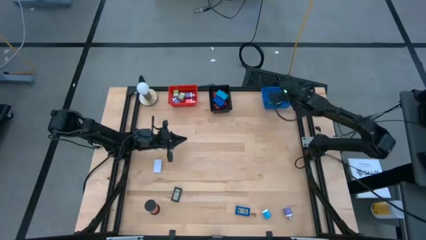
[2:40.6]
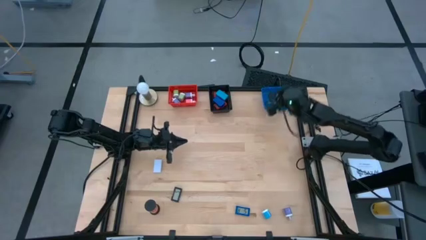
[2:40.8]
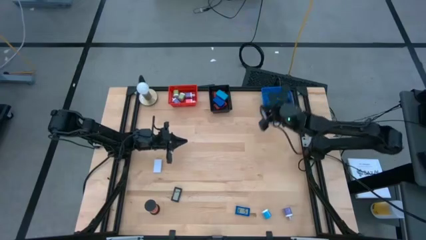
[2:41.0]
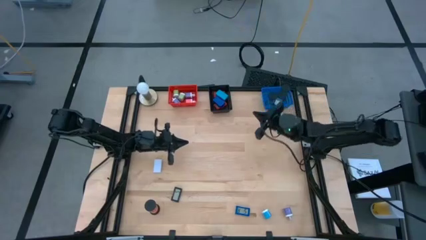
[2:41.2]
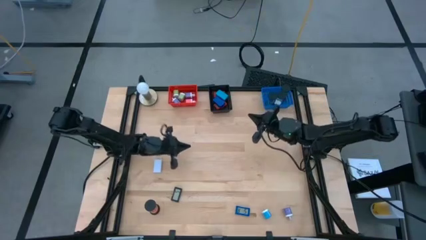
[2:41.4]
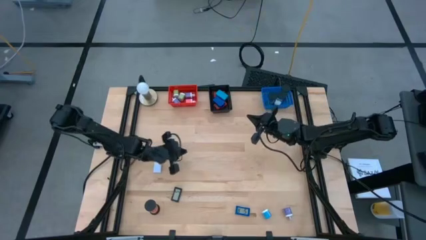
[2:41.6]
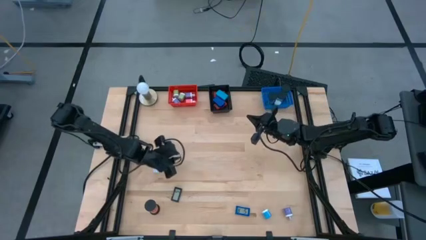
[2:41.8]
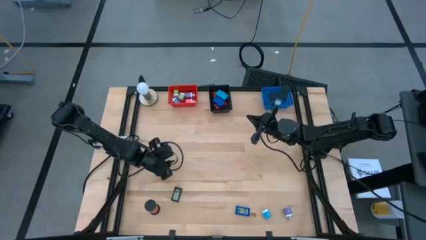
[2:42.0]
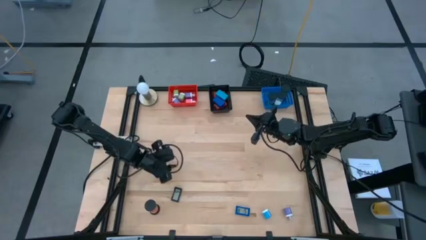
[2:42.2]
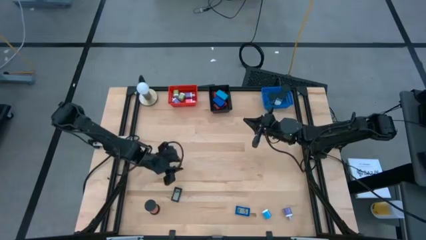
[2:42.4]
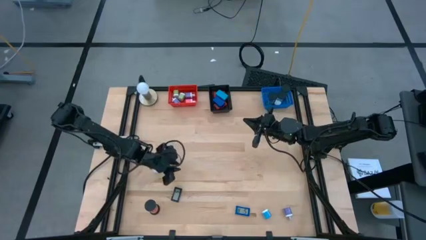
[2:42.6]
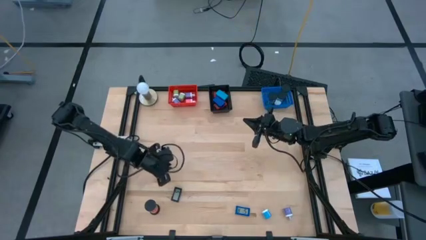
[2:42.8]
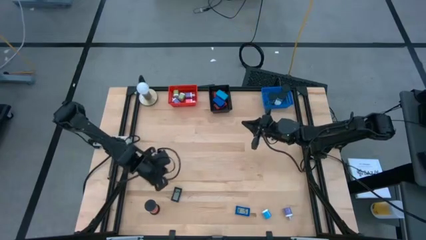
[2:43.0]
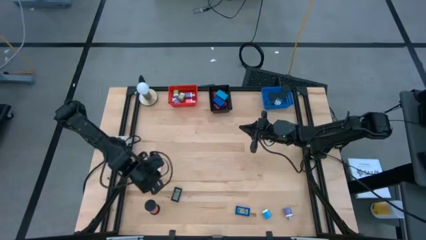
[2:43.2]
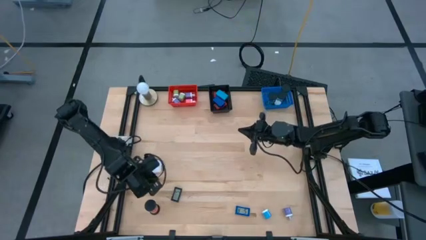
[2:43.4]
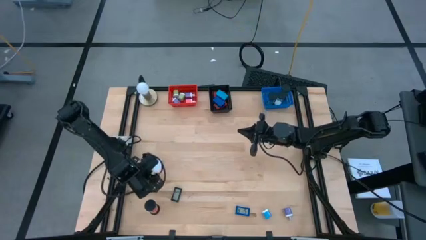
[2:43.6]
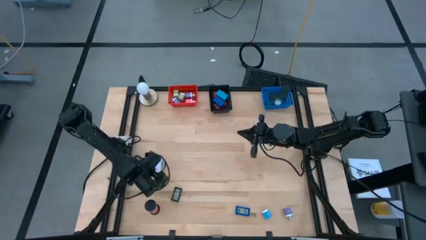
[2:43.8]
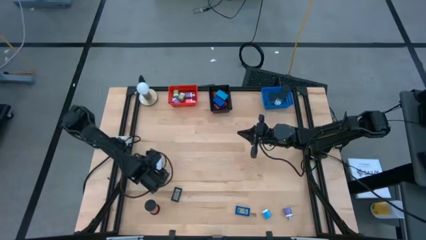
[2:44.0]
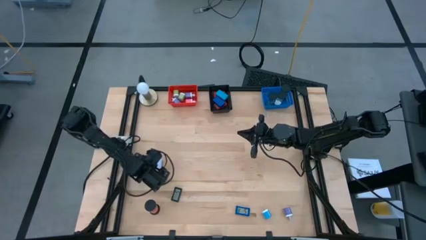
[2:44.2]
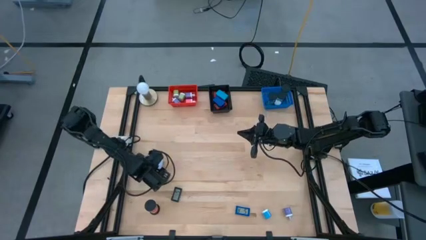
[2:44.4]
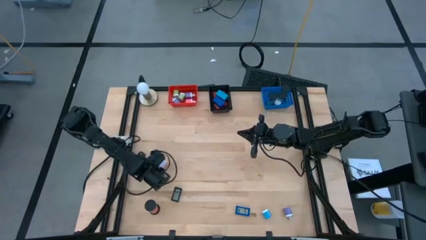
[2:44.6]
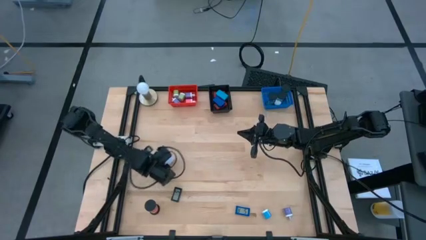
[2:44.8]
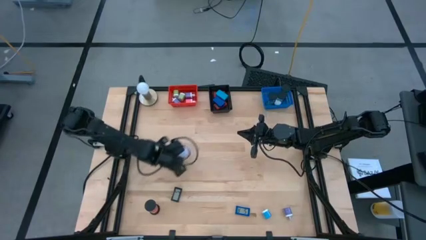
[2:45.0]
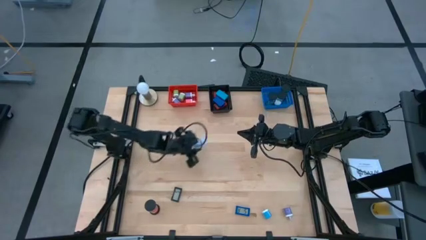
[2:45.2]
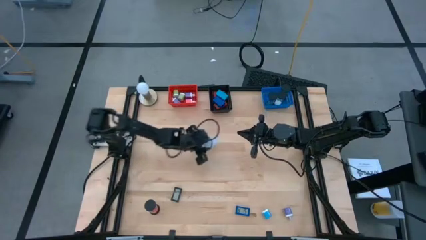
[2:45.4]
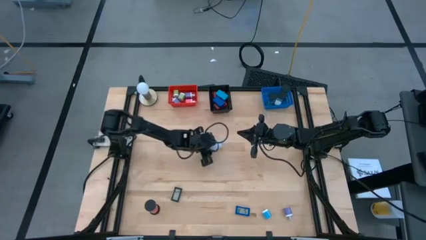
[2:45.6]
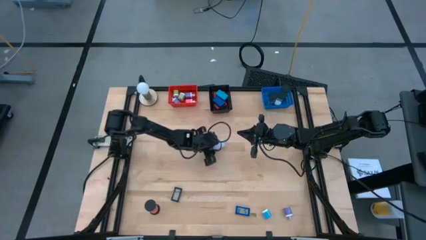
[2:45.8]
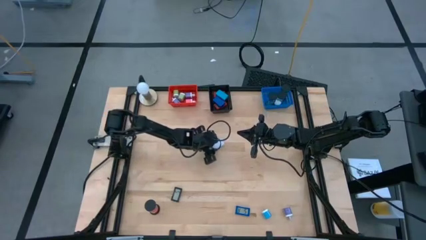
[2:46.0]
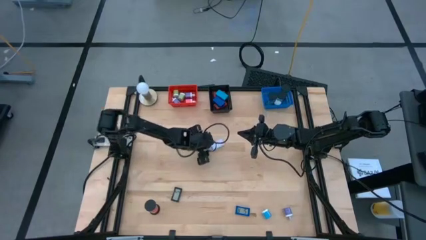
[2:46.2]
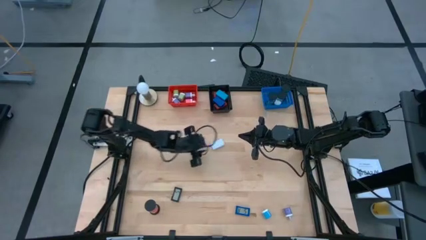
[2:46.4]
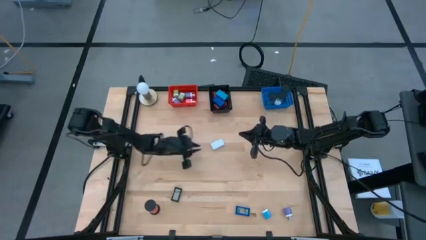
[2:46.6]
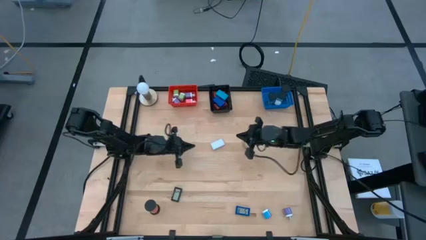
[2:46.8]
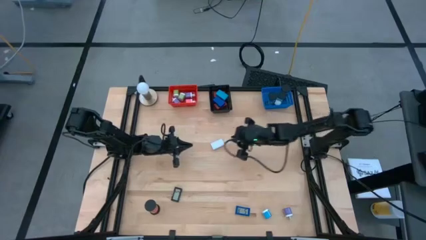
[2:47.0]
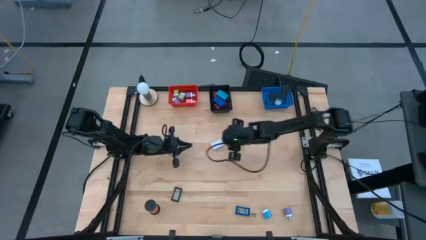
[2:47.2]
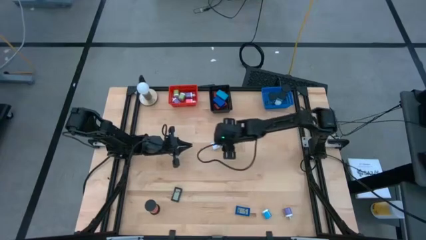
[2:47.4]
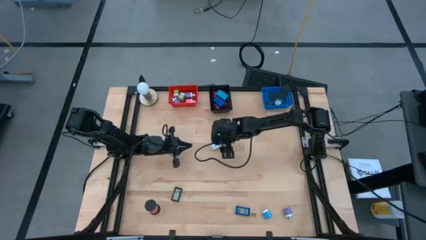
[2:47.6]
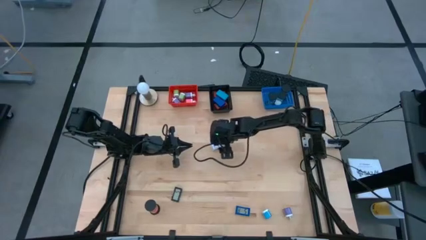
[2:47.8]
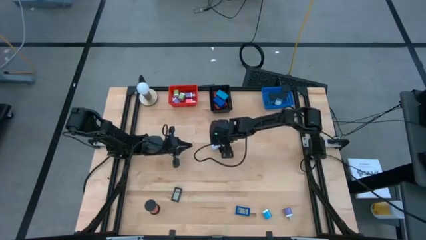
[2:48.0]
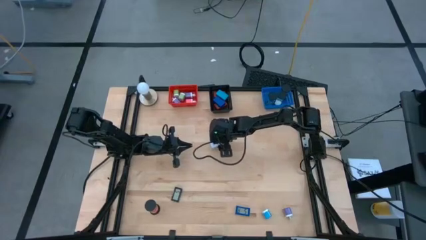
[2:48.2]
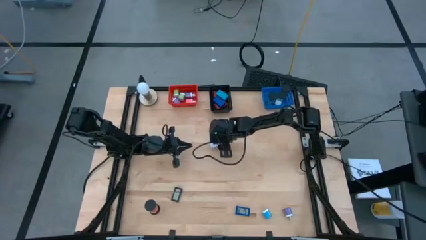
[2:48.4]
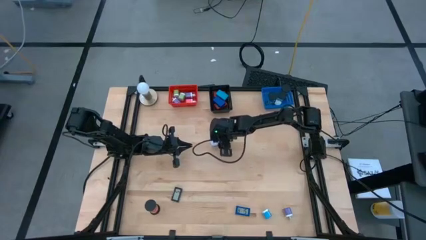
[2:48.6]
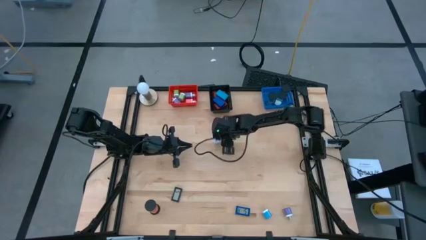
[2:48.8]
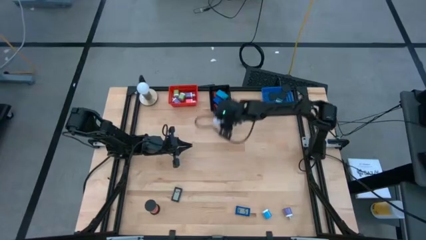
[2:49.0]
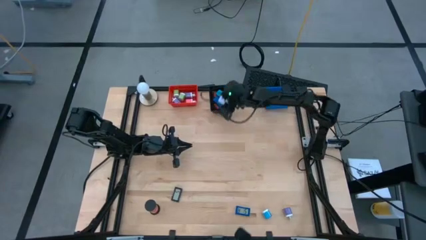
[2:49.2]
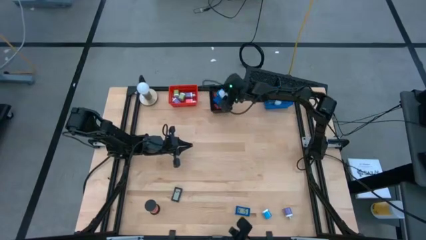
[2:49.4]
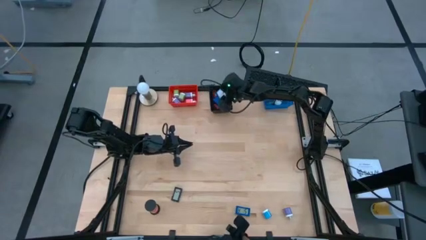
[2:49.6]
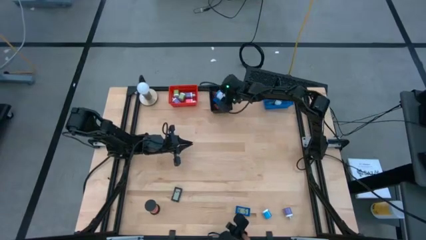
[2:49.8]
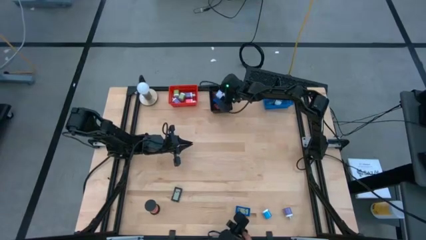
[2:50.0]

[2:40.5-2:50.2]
Task: Pick & Place Office items
Put the white digital timer into the black bin

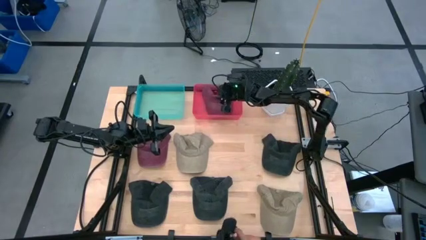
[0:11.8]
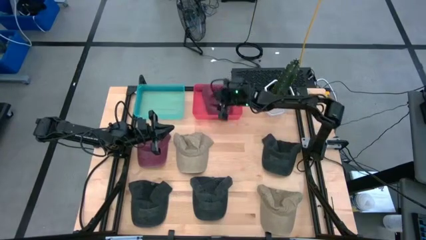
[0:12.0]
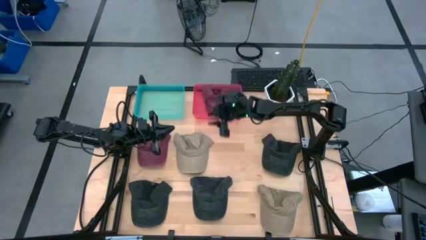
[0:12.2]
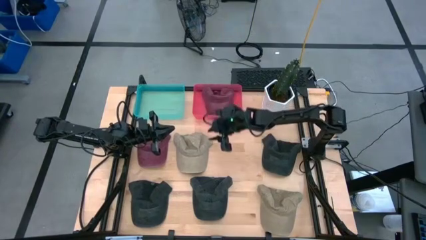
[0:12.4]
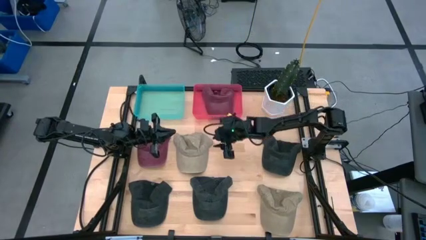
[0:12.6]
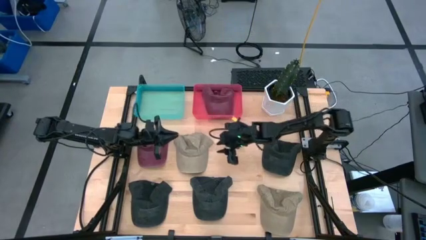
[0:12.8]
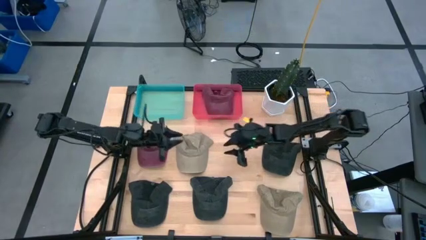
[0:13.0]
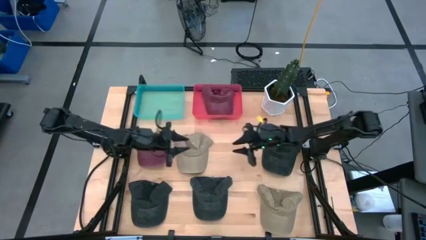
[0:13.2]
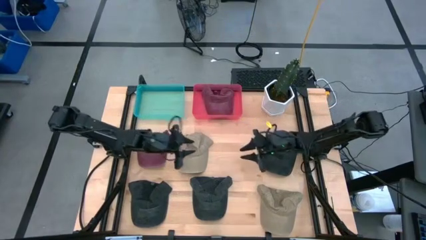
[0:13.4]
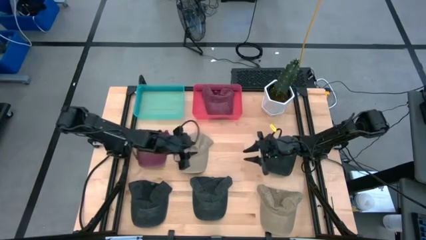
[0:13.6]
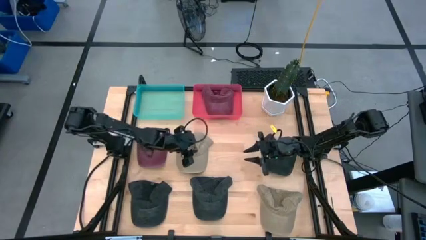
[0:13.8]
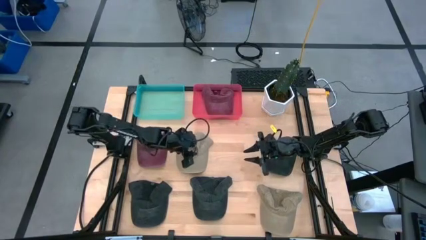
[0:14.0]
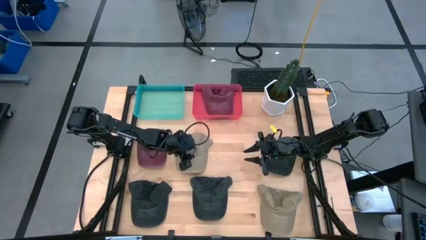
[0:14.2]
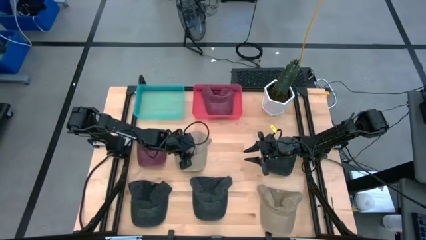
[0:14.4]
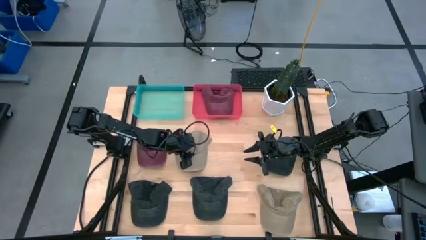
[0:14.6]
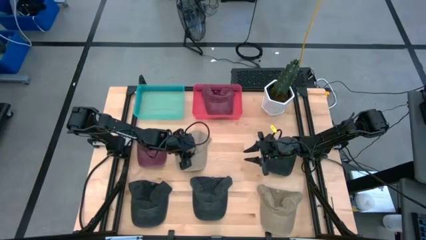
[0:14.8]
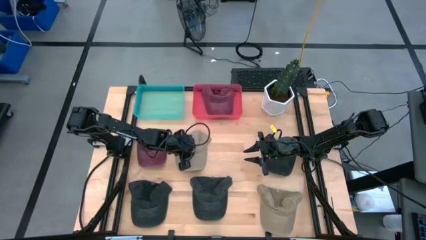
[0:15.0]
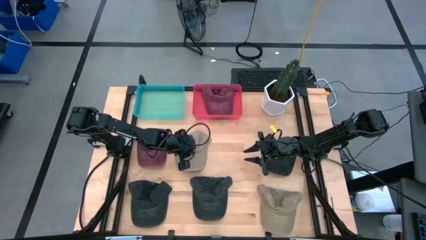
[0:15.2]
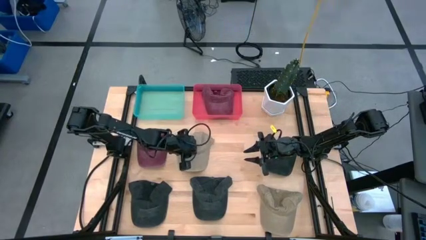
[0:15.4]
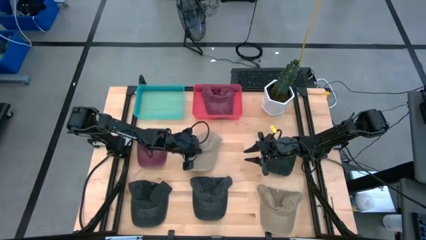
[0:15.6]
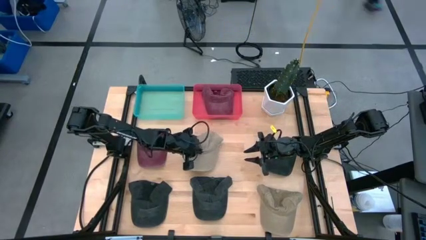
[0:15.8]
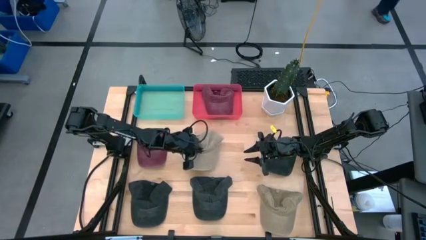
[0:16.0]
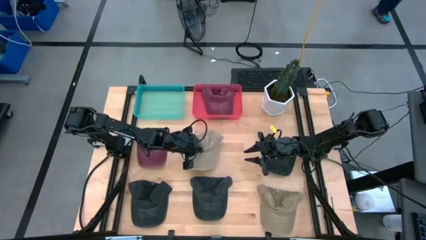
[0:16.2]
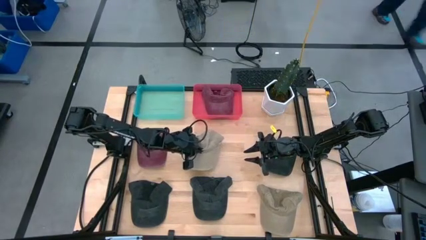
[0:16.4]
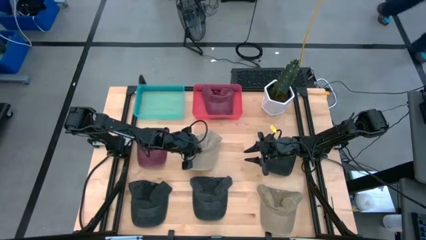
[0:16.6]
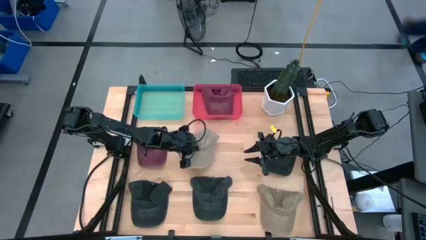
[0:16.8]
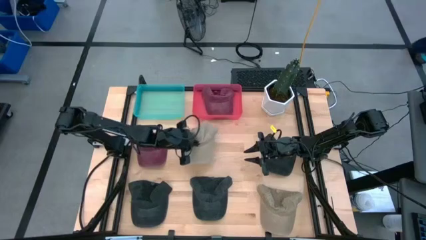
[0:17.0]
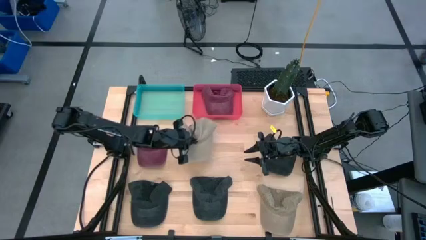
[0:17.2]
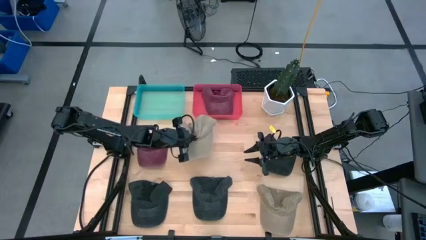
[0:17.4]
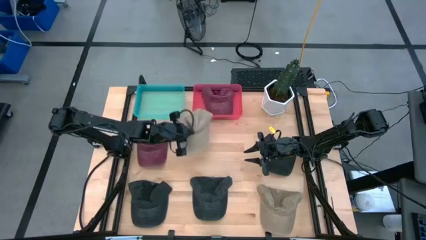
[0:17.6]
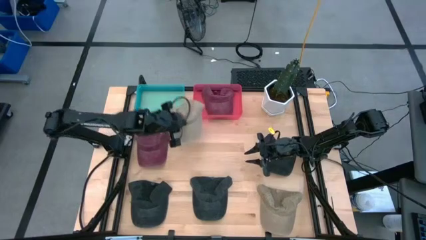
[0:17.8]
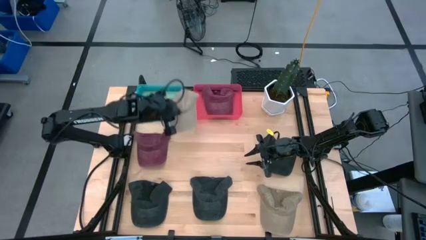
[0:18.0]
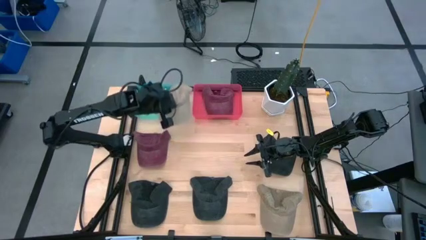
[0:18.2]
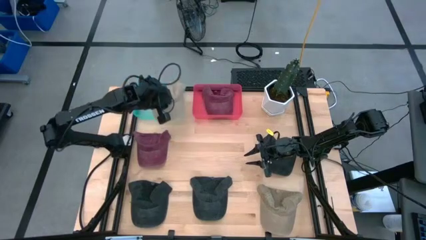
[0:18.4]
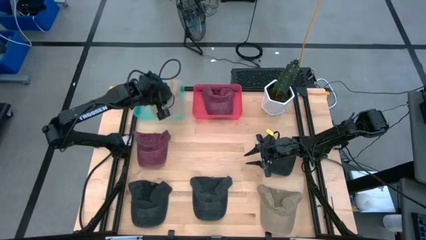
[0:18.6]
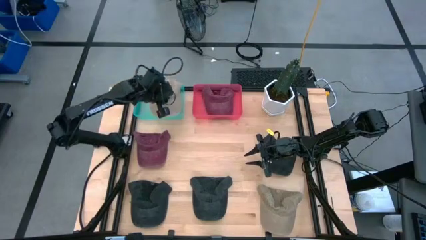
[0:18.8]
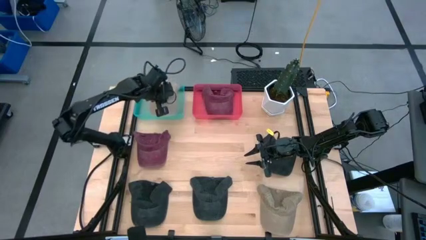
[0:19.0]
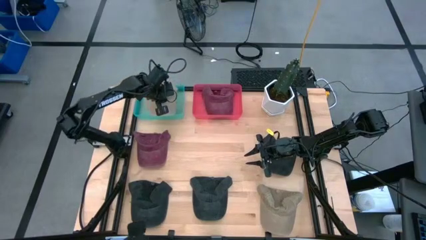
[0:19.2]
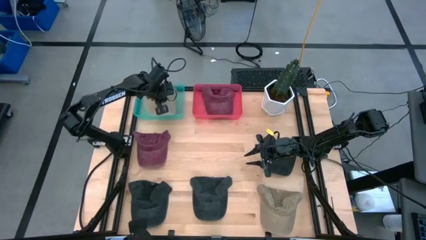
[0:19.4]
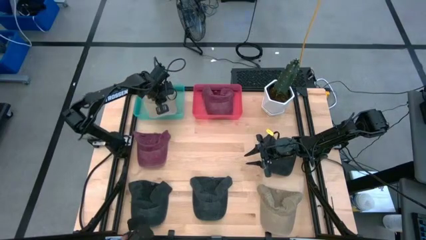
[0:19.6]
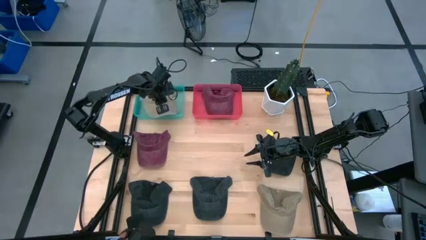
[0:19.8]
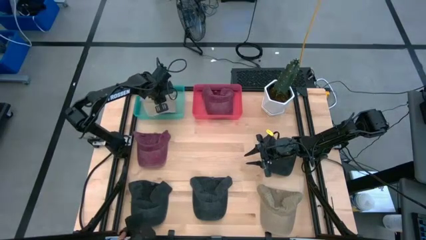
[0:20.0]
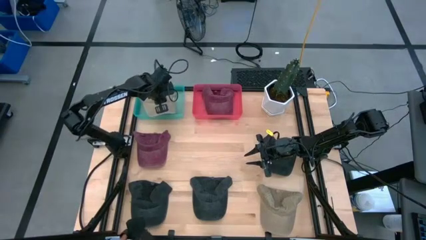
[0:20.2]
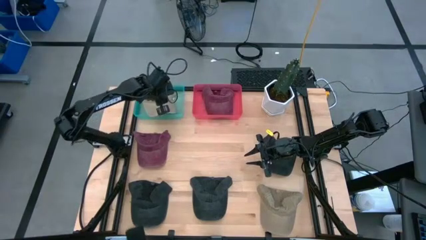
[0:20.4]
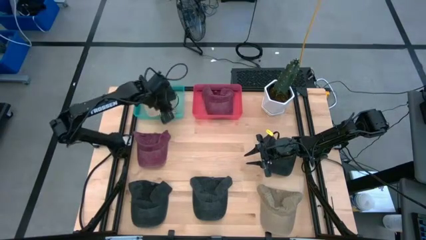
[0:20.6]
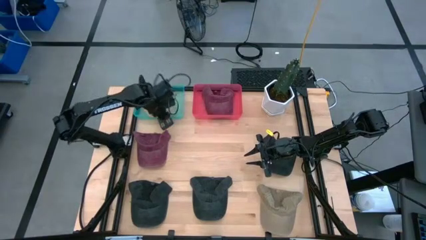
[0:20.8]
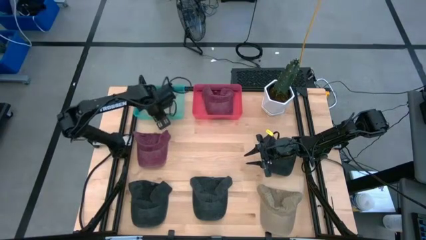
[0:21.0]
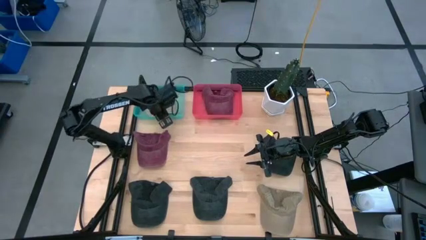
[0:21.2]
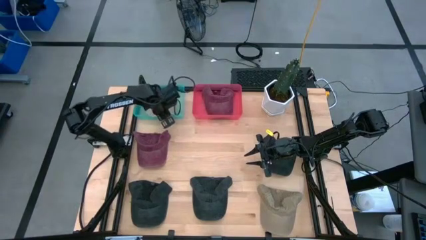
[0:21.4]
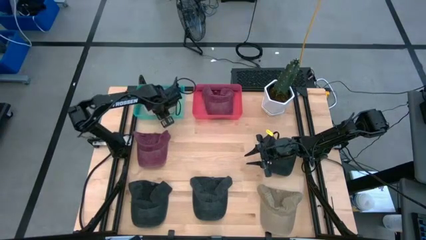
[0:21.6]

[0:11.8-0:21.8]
Task: Pick & Place hat
Put the top brown cap into the blue bin
